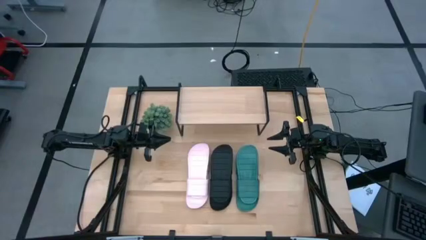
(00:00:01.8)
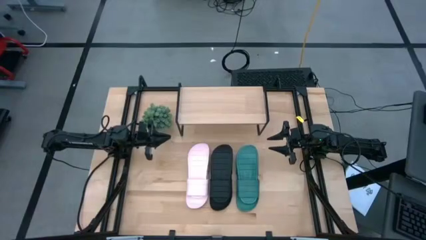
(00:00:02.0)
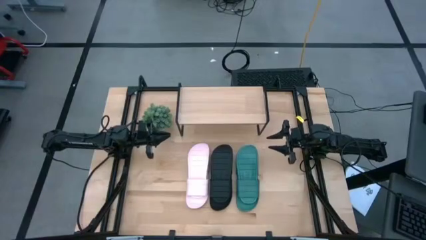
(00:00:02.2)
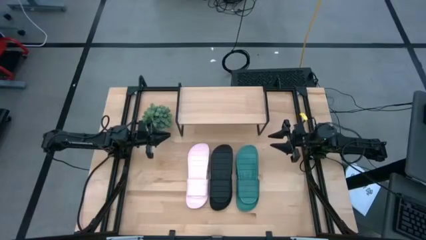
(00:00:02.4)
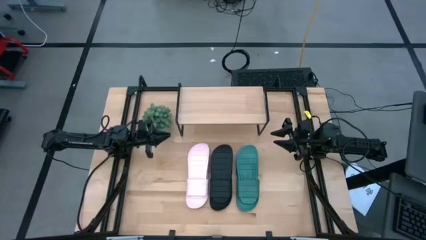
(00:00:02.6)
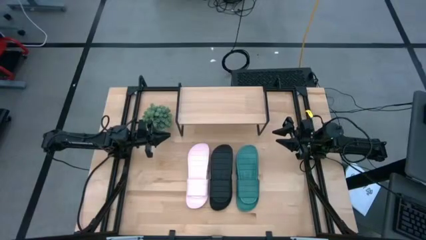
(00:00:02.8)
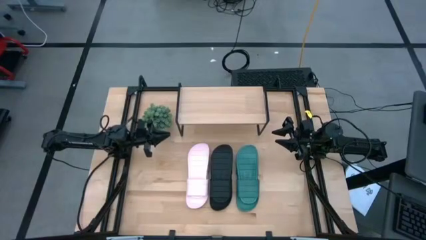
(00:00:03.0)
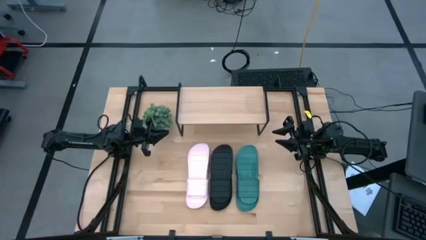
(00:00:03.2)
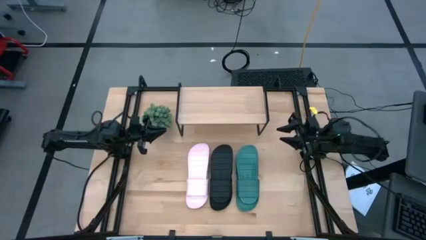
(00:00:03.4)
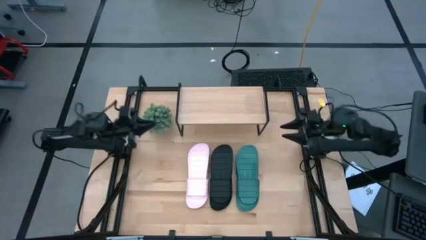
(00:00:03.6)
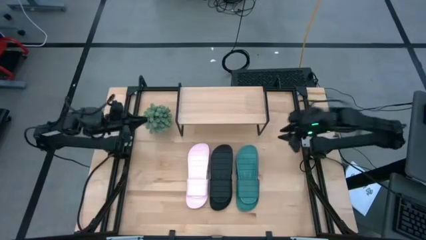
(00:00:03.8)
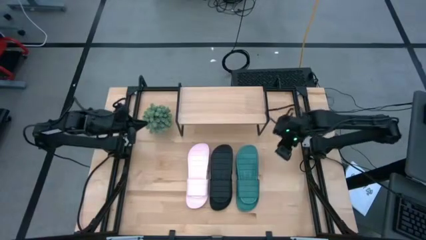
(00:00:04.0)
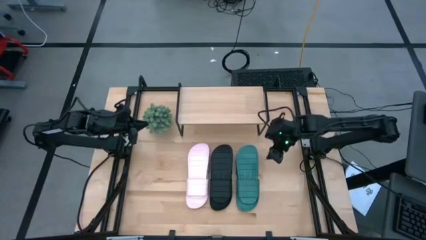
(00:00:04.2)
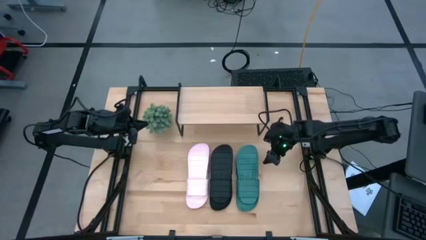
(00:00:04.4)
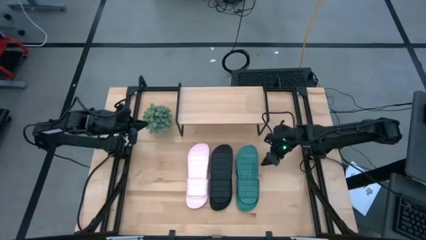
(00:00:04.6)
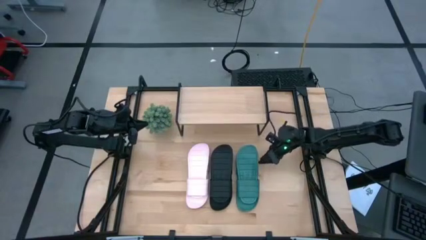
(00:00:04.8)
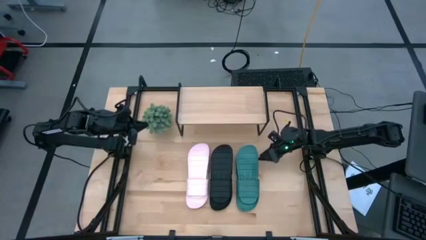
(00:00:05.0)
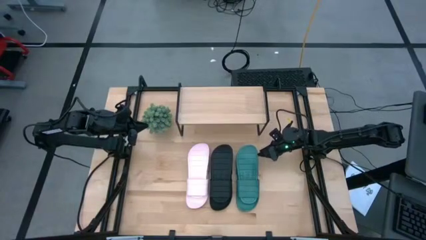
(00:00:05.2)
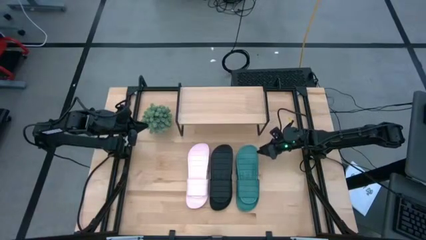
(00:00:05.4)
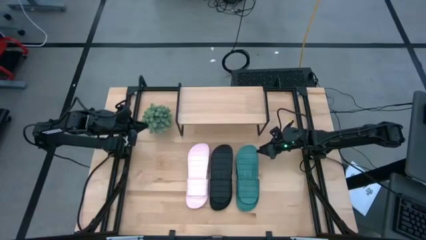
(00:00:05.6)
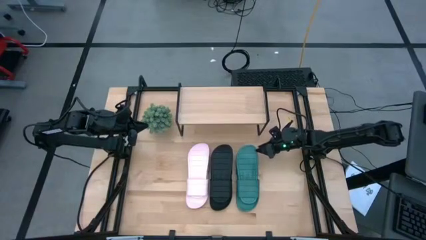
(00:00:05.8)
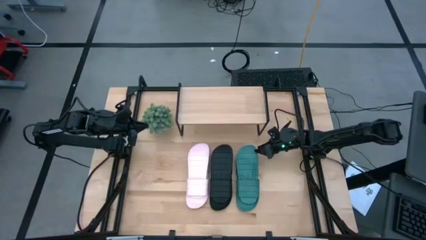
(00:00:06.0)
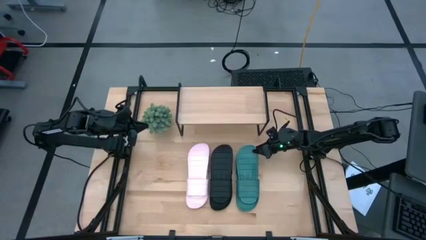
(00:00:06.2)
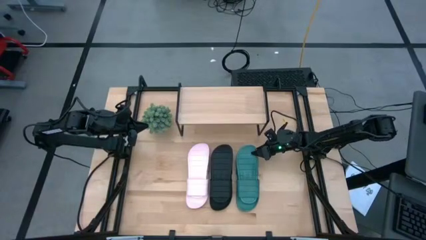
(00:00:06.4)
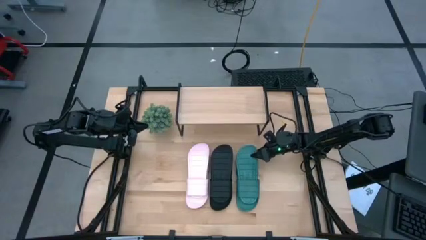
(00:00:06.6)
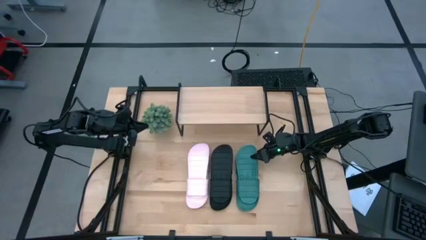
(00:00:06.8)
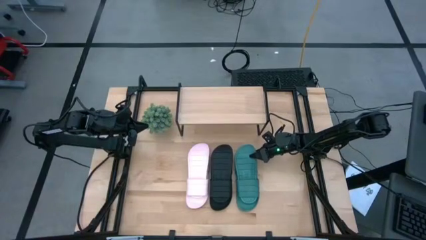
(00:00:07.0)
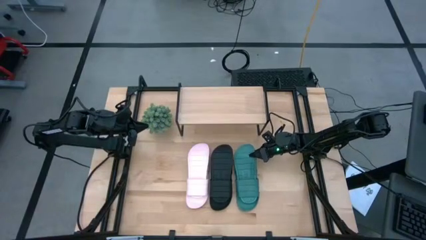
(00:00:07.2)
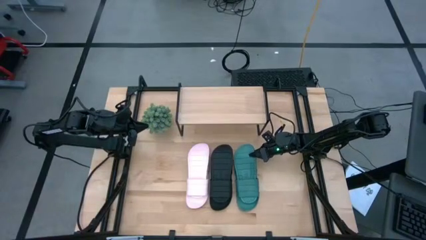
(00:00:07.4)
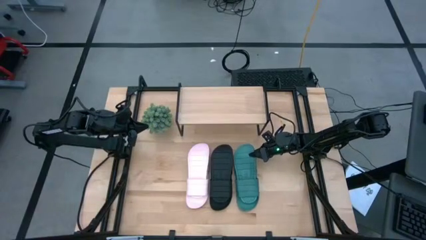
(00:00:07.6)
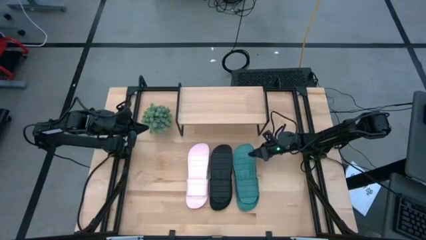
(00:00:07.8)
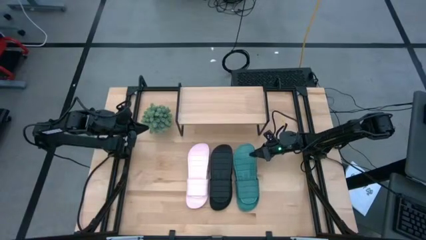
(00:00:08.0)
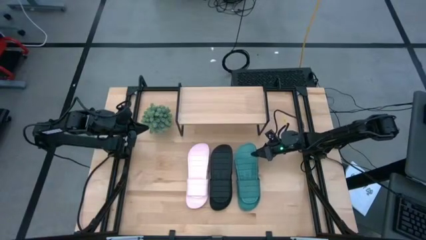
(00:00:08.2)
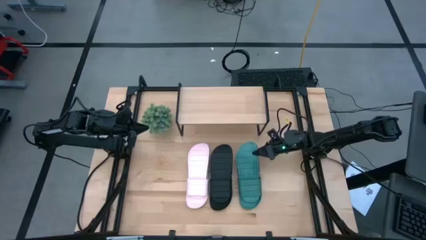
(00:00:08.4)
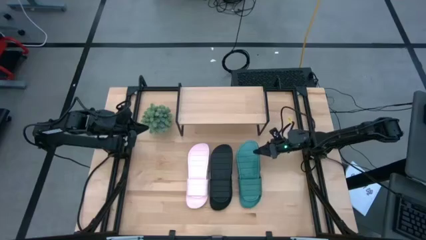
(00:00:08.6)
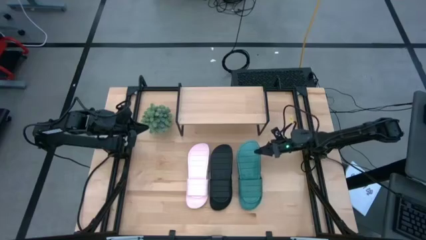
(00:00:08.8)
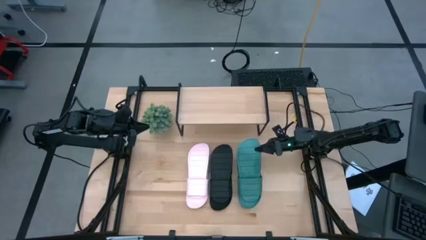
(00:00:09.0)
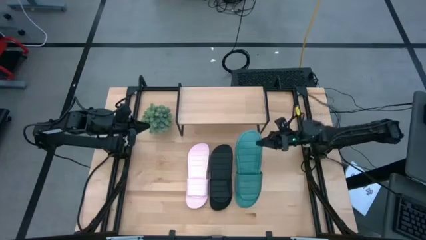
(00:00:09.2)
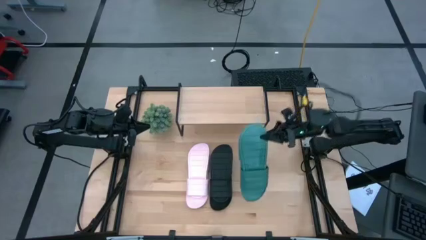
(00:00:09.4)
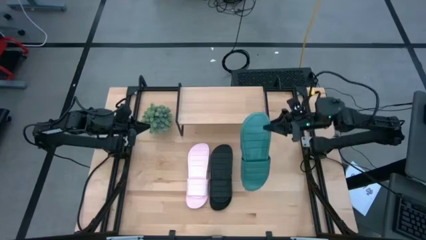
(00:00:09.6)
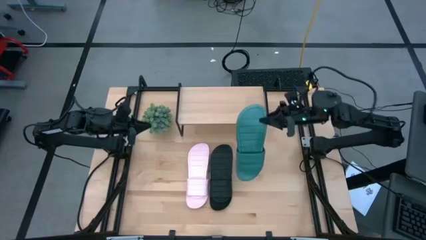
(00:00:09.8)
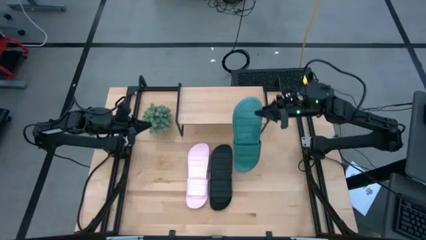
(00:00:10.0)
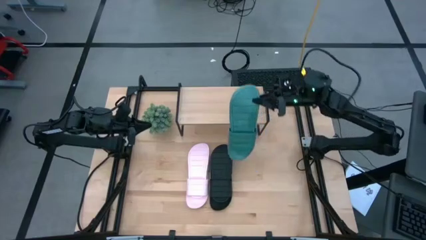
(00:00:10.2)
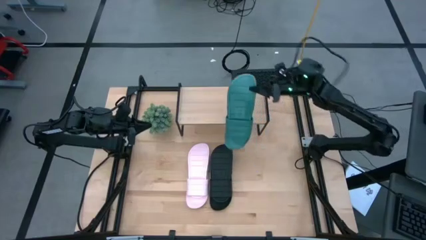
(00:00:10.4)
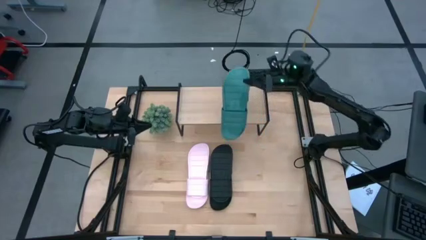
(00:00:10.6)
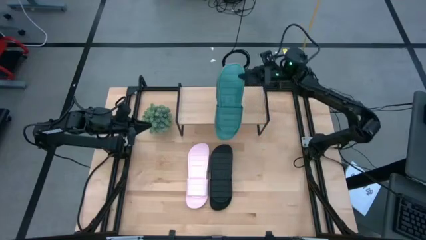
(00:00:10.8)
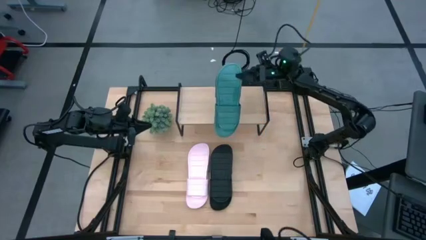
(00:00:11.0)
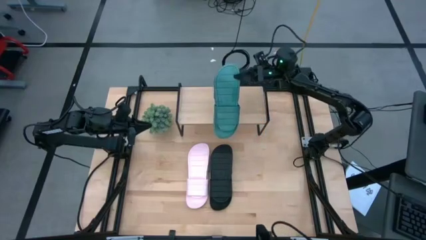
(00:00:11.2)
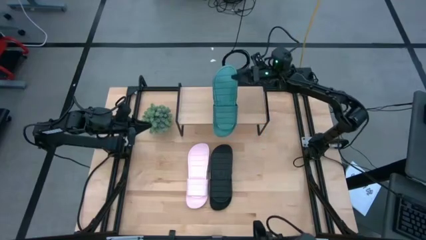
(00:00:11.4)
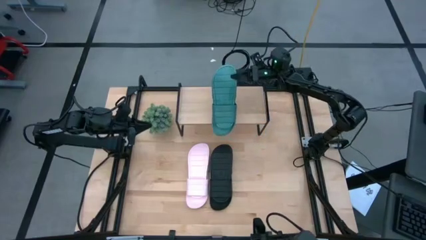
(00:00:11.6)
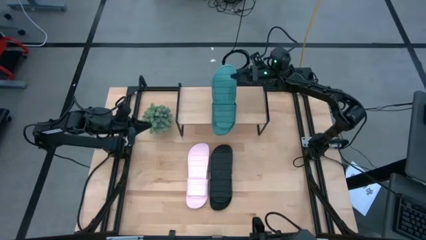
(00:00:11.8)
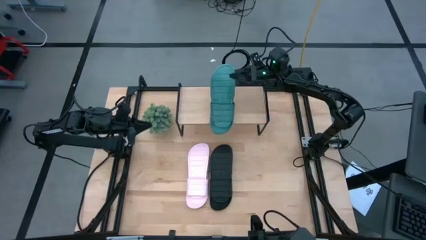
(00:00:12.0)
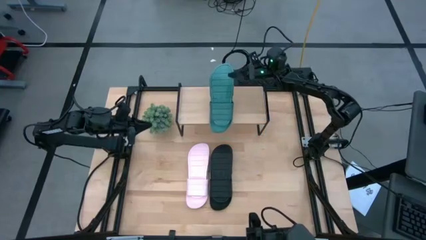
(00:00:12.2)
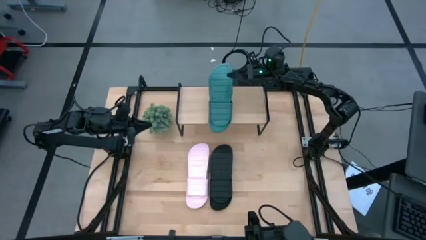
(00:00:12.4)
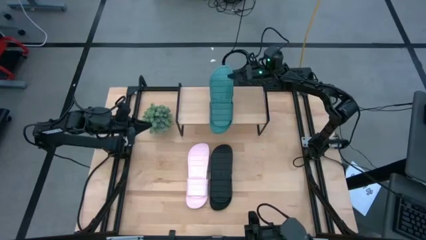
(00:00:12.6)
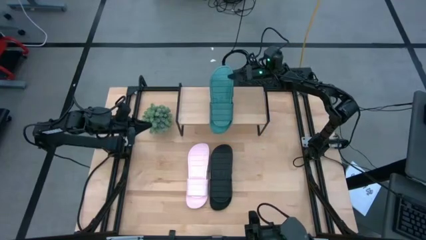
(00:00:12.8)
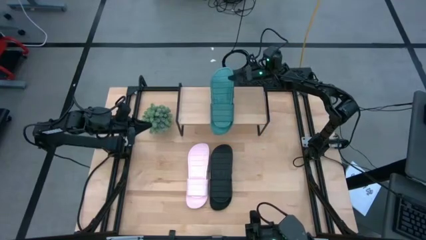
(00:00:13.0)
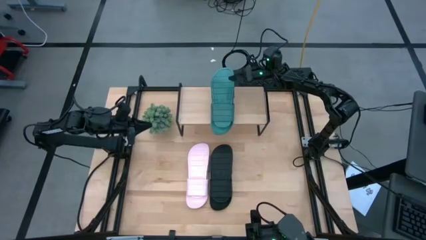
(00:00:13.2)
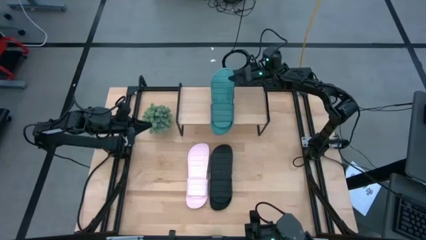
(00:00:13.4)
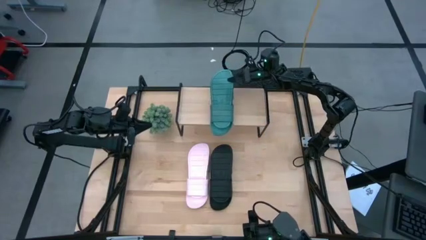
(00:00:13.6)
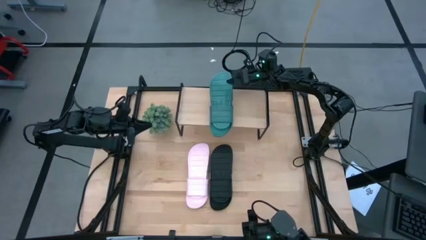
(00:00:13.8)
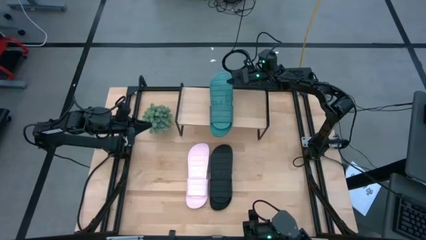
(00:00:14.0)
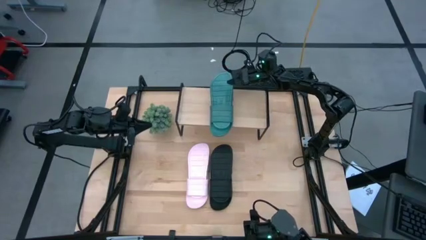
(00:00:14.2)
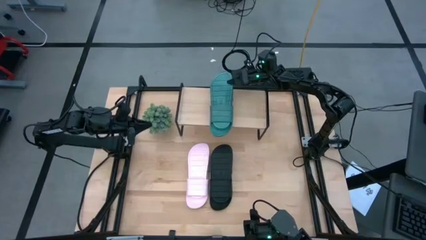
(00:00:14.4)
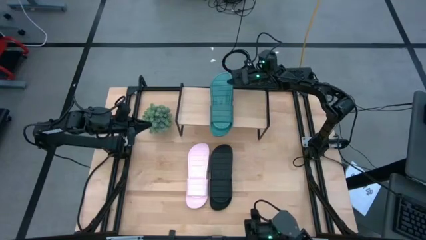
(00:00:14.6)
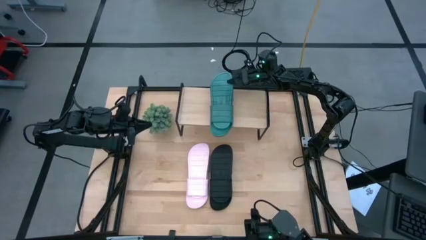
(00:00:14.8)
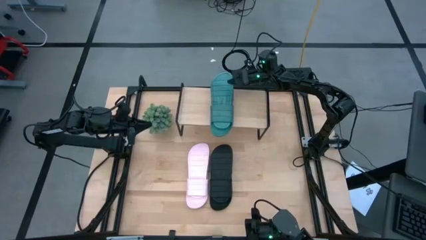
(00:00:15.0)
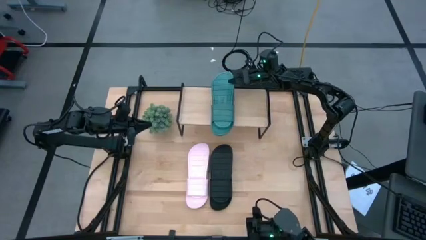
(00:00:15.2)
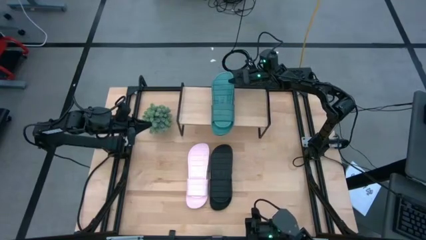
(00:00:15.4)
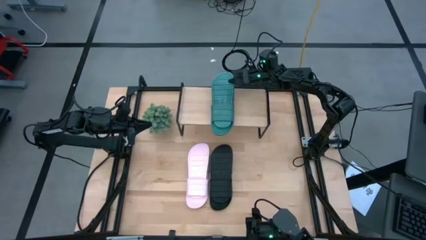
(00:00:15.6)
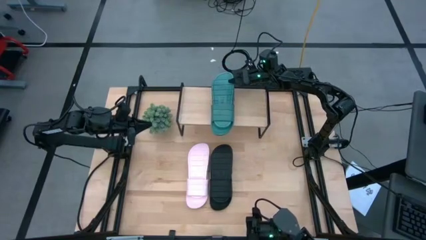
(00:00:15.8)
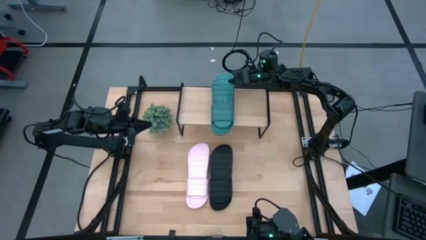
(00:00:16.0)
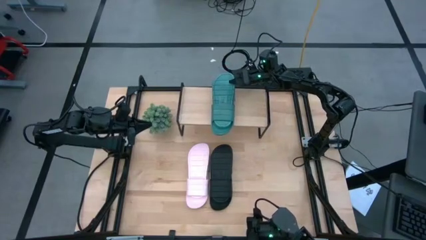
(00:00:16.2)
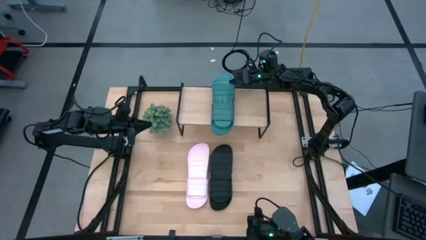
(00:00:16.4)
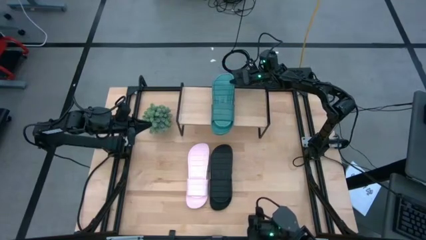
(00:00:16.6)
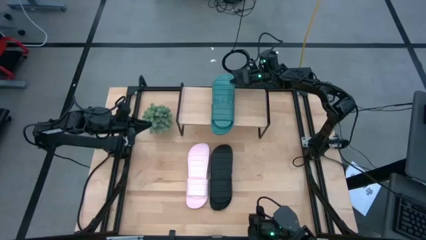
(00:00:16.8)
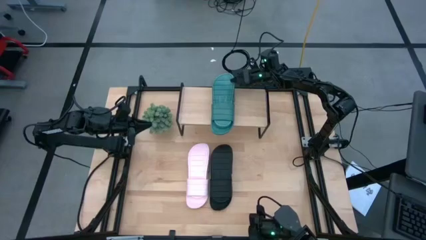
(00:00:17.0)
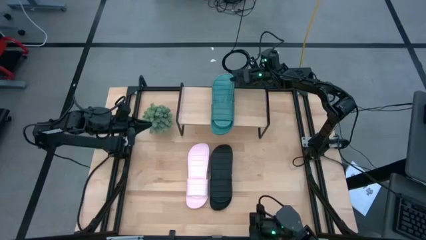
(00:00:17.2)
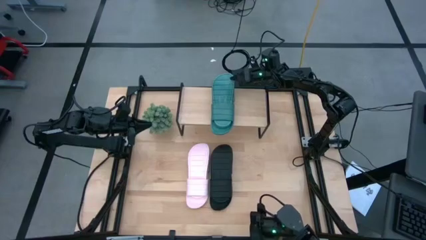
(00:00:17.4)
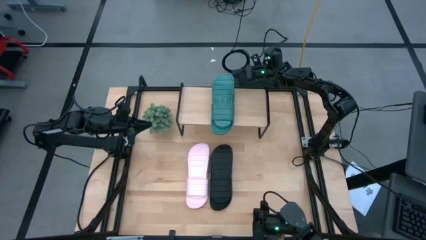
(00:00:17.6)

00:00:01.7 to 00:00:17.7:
Task: Pick and place slides into the shelf
Put the pair of green slides on the shelf
